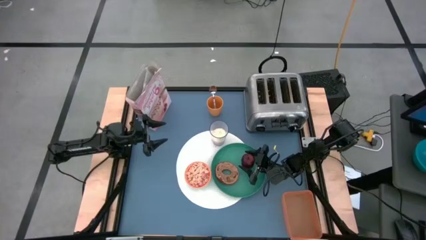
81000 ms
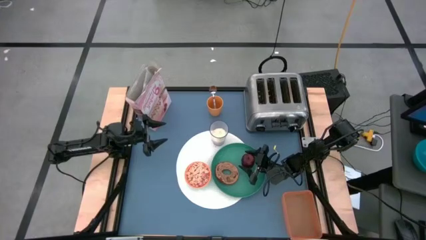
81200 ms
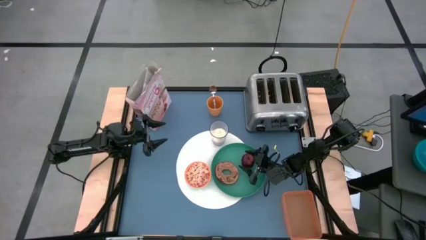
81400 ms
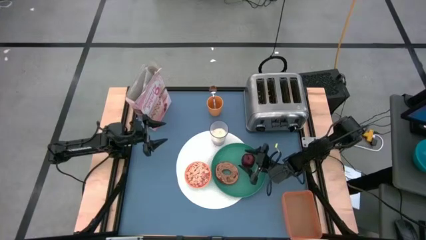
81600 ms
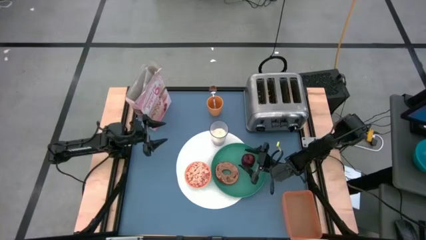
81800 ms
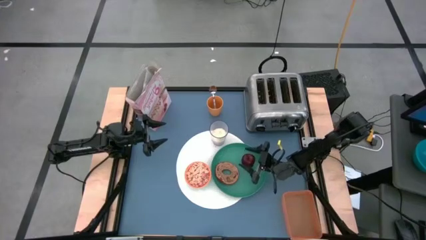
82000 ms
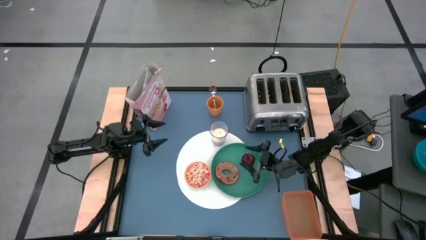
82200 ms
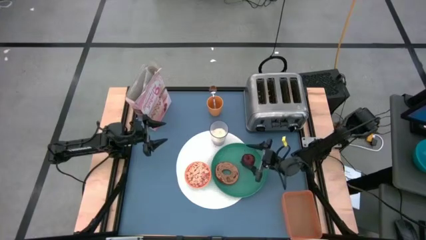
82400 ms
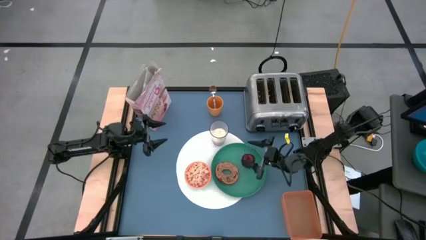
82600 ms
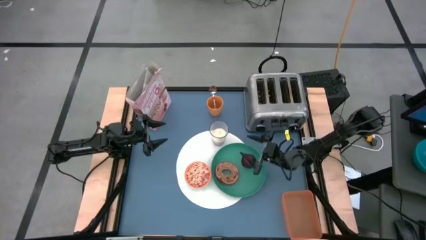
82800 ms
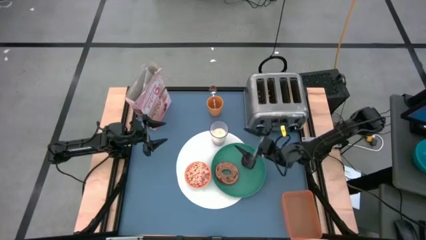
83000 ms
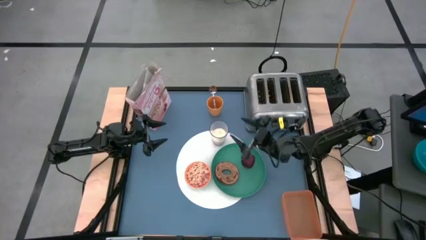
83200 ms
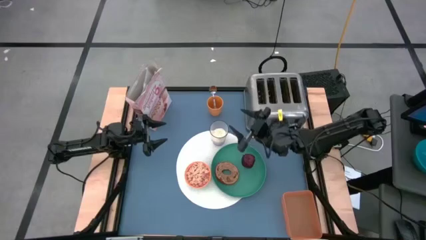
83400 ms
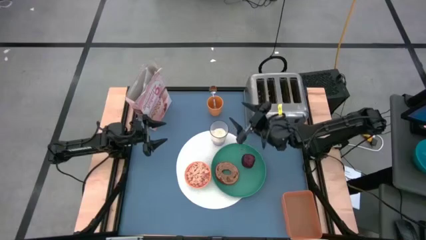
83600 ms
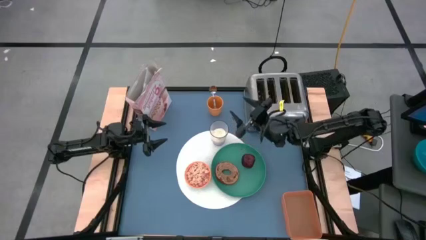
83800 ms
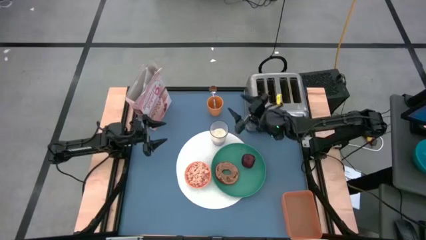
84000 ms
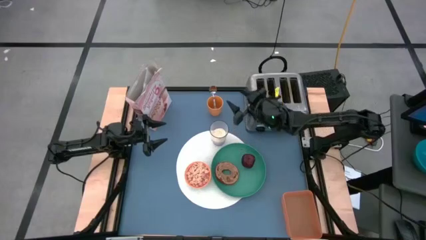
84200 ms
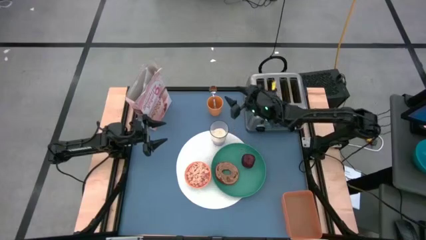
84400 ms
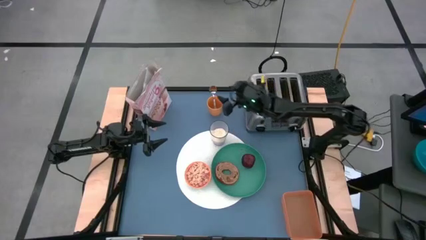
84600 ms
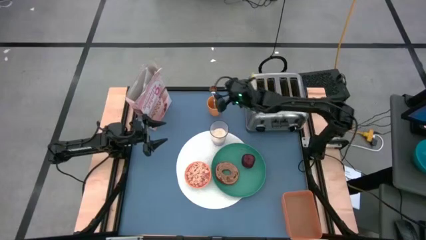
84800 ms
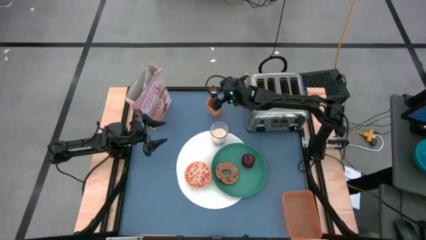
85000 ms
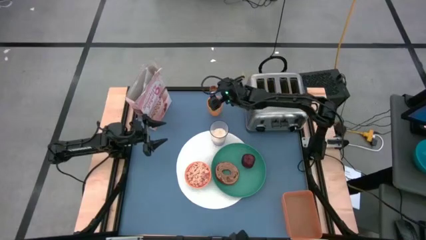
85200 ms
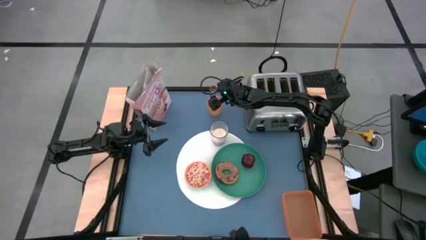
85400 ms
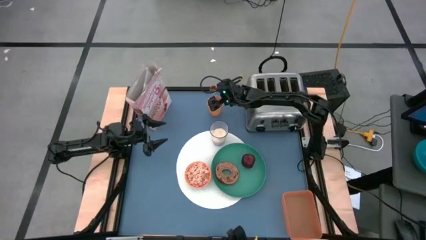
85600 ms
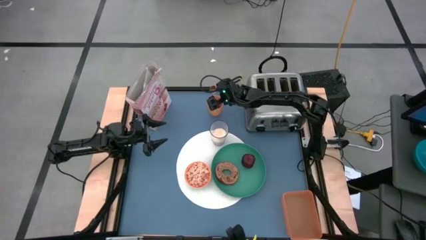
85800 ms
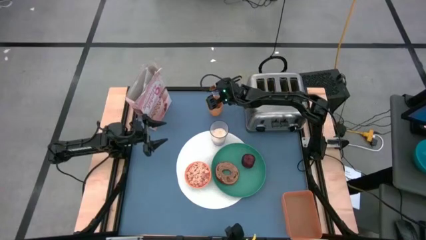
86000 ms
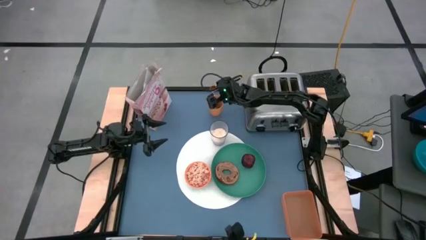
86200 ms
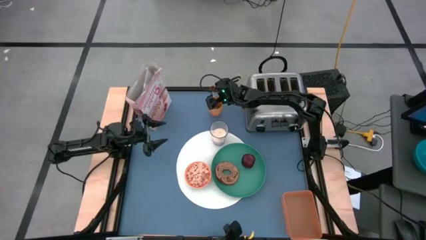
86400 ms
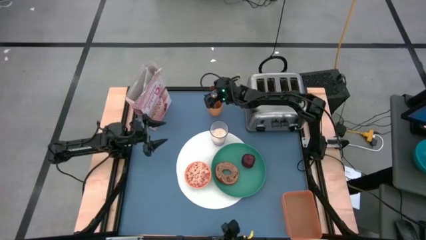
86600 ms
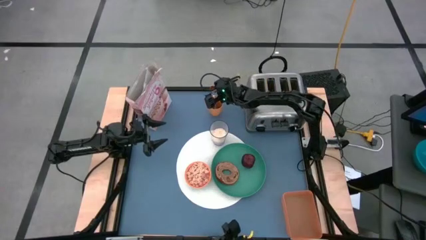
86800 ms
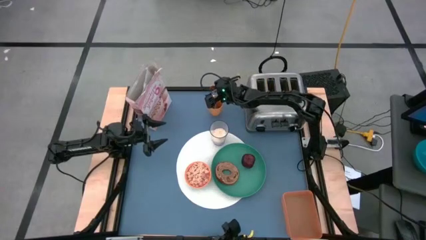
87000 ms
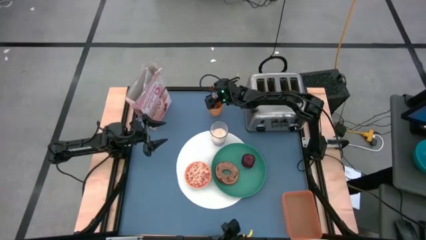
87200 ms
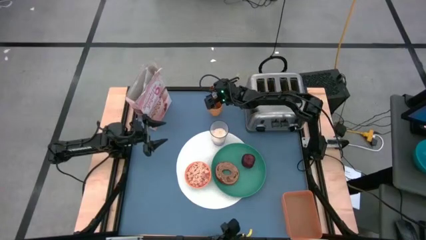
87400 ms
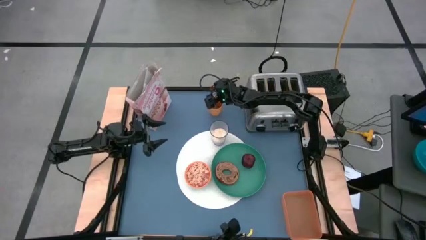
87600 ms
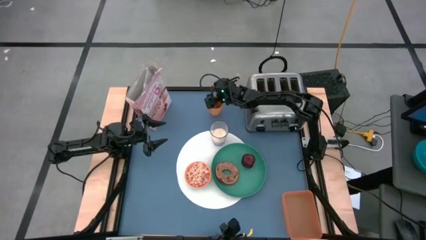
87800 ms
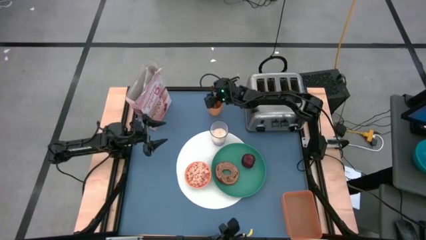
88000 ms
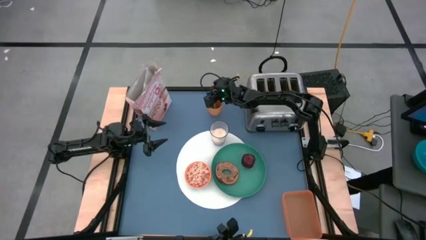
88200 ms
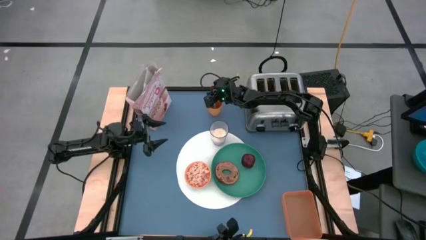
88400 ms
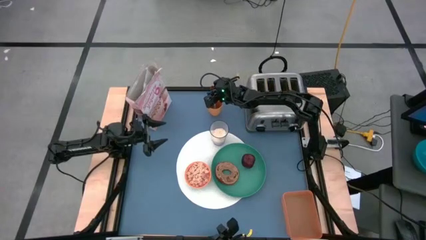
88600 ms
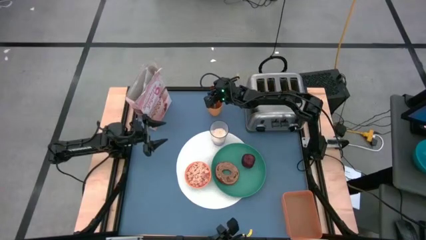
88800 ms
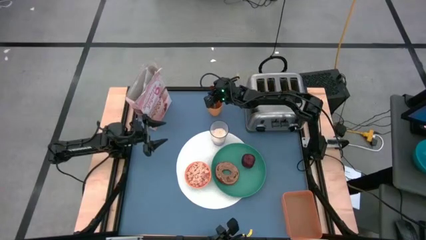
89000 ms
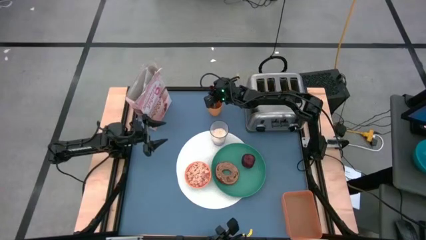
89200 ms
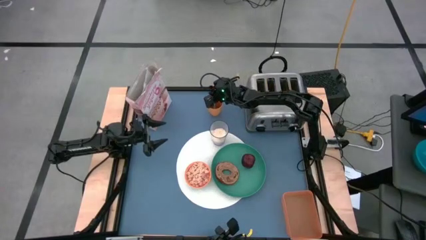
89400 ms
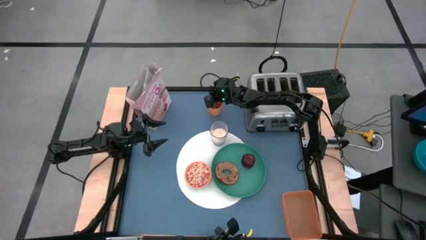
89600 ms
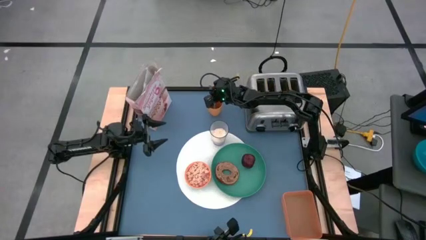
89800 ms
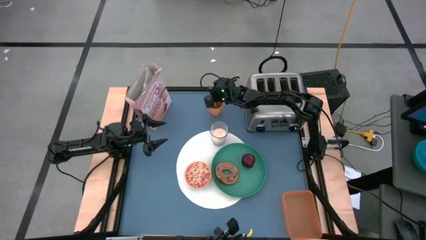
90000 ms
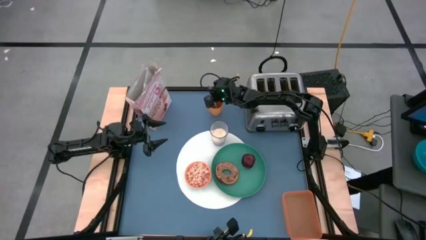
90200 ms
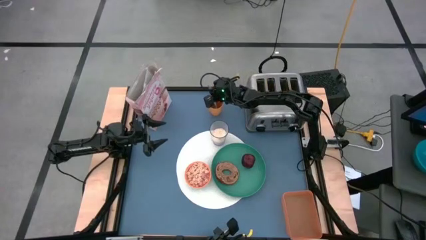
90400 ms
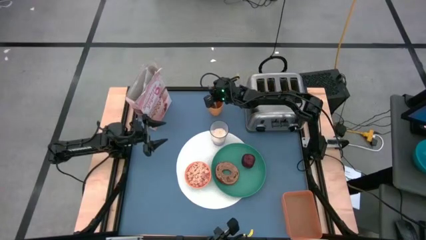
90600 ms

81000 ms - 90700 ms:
Task: Arrange a breakfast setting
Put the green patterned spoon on the white table mat to the left side of the orange bowl

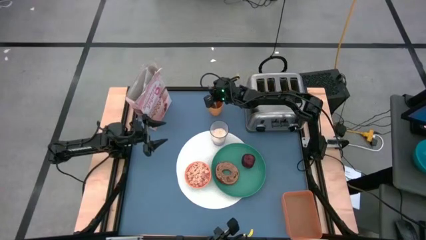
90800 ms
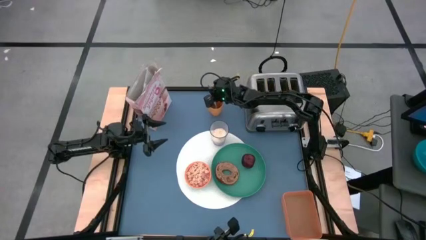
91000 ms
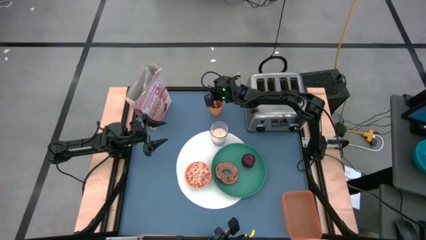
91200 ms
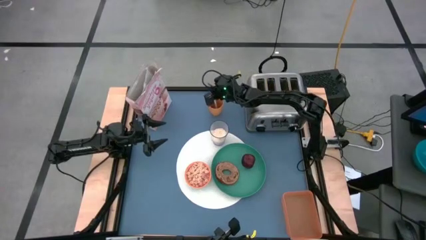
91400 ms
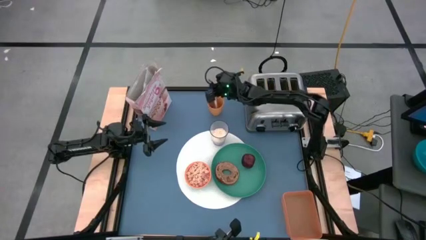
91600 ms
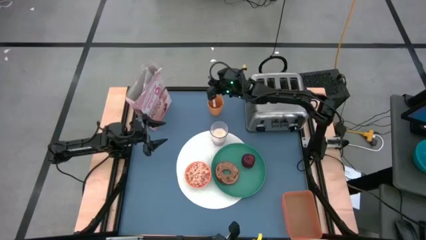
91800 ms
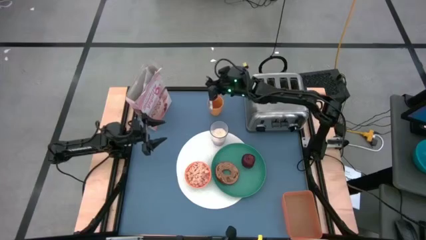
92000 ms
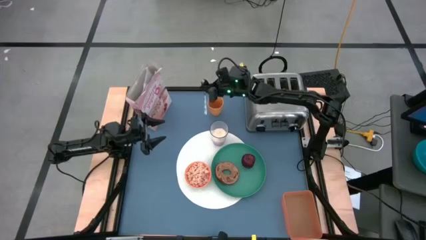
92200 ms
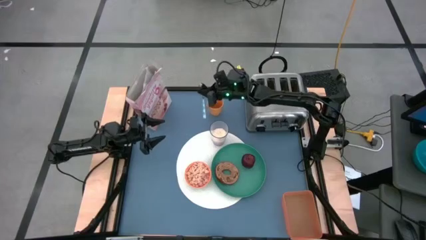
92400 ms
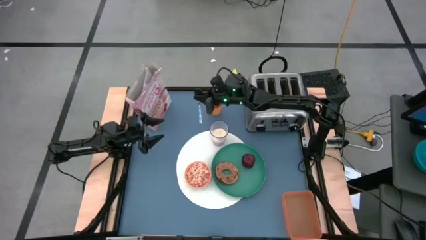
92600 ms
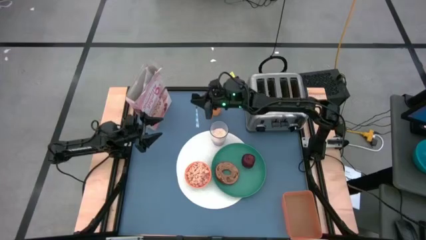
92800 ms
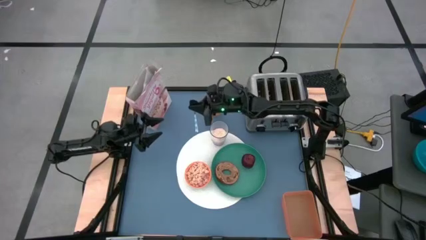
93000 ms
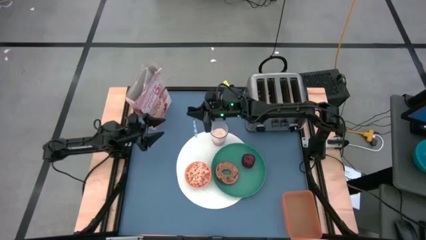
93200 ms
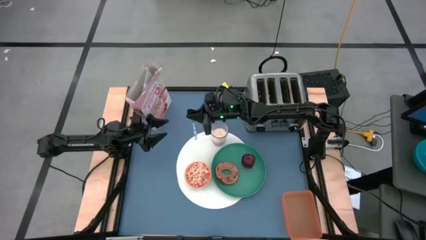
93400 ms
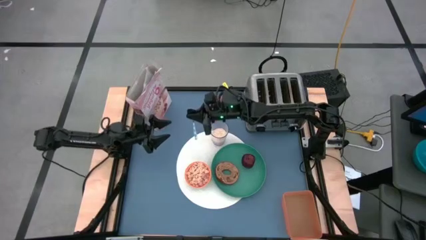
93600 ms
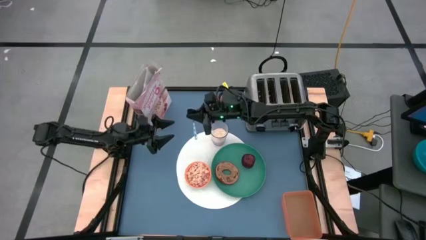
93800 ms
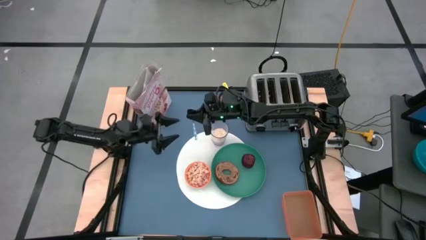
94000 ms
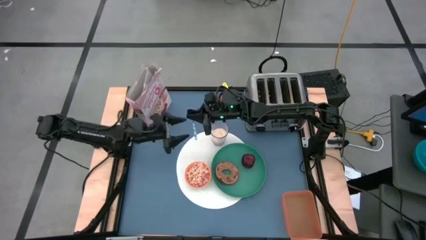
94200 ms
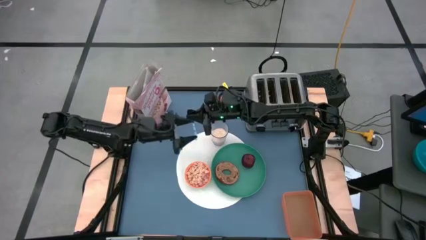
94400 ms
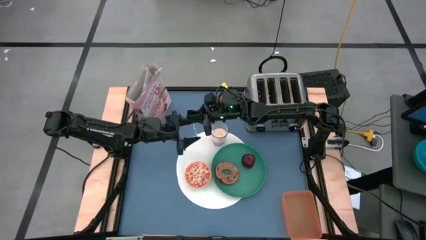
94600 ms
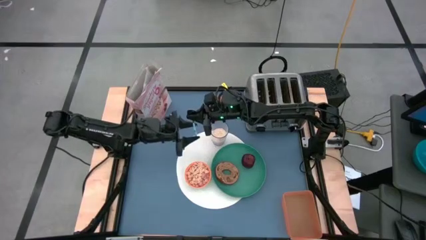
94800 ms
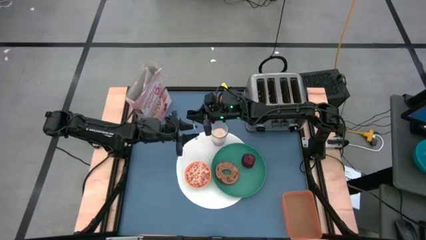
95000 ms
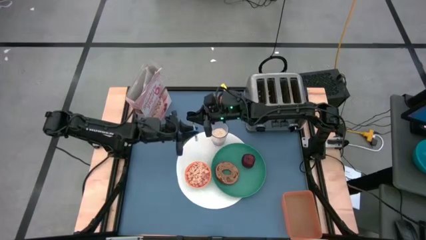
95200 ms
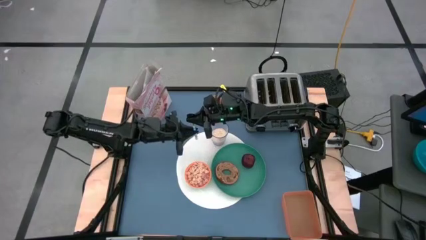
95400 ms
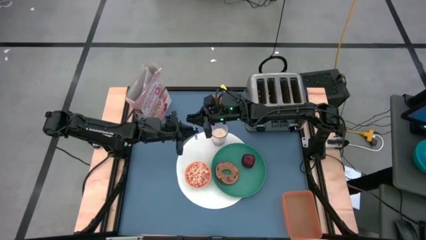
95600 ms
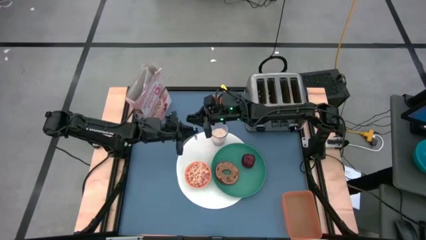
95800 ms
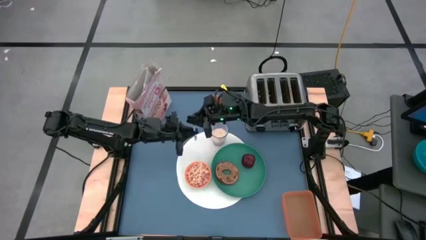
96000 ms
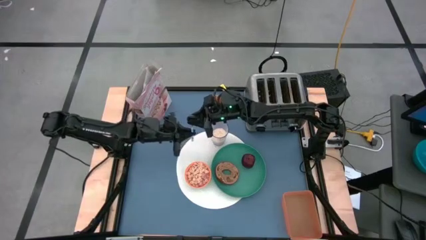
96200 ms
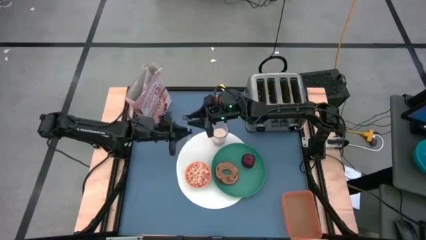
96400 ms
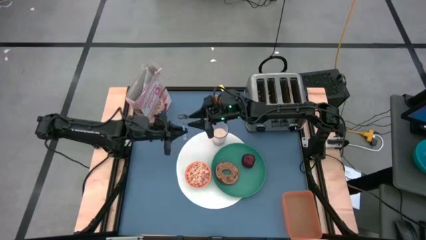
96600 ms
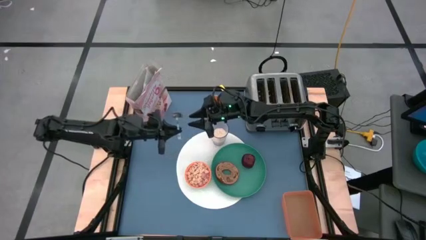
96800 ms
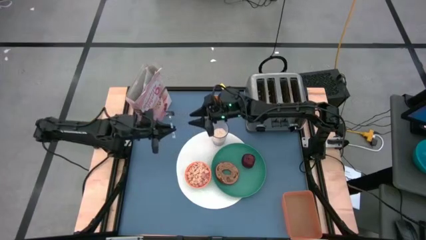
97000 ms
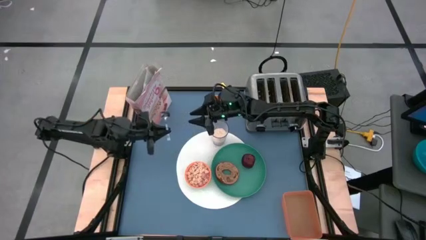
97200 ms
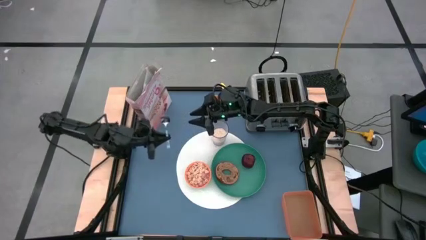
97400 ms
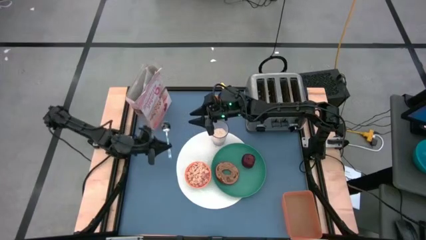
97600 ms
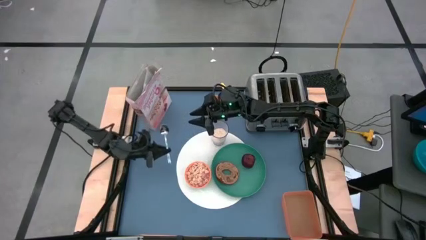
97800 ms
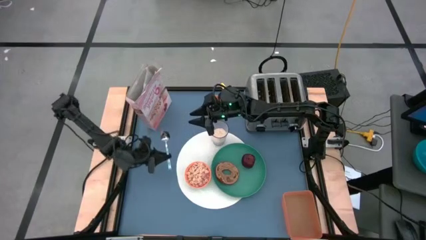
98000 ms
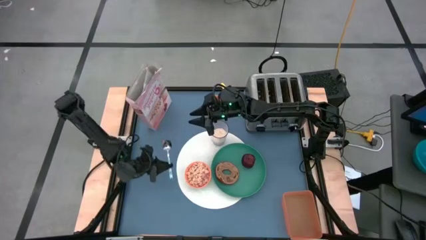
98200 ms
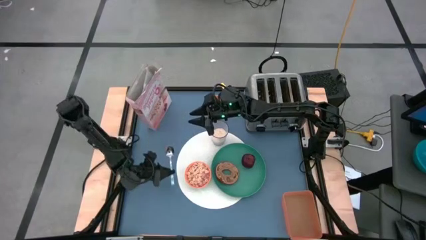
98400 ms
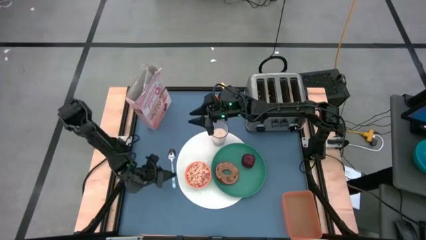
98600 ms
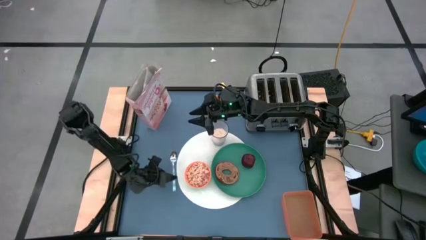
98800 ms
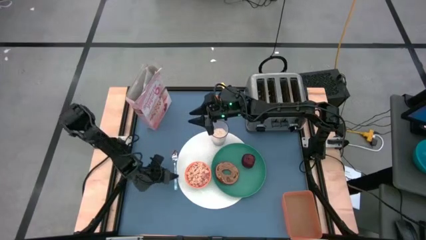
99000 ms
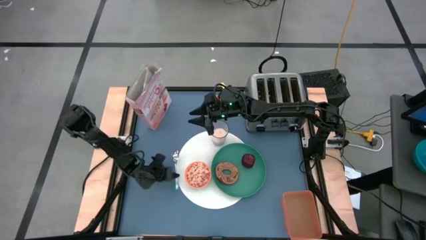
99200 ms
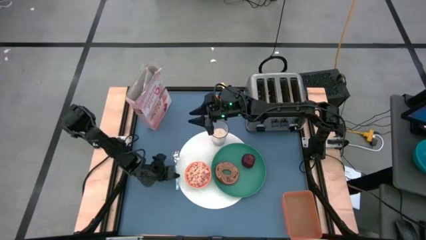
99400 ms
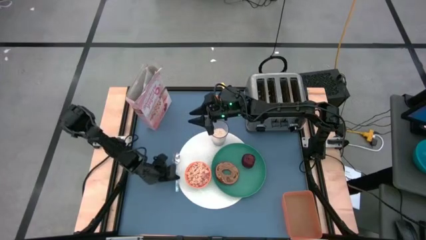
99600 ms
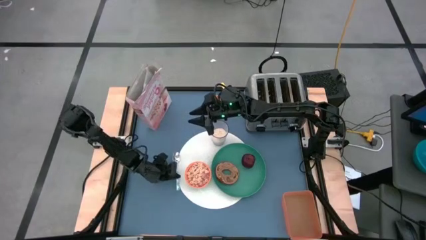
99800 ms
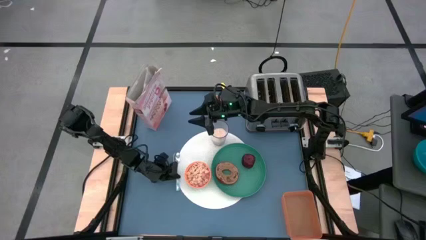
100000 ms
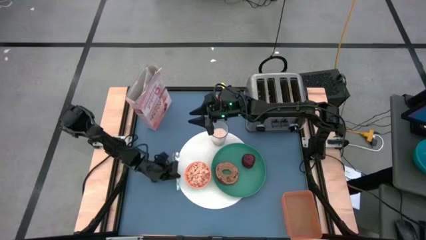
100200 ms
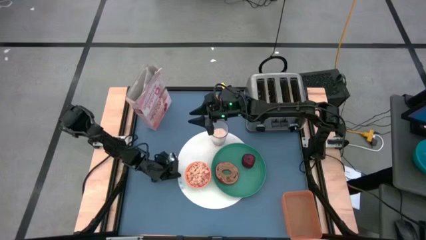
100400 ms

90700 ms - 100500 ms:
Put the green patterned spoon on the white table mat to the left side of the orange bowl
